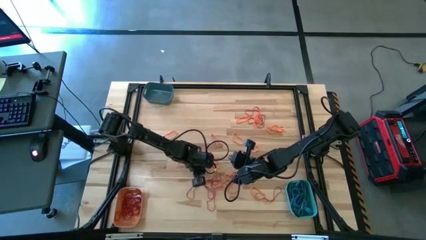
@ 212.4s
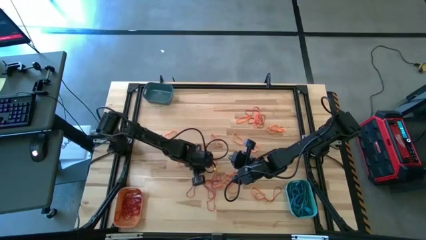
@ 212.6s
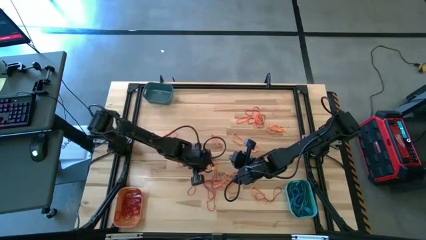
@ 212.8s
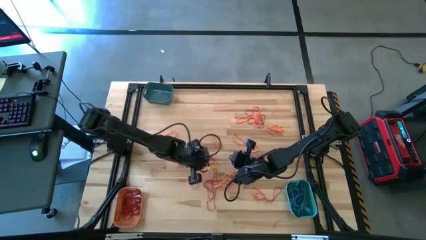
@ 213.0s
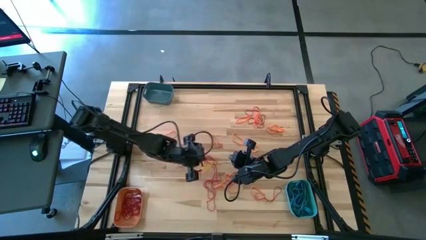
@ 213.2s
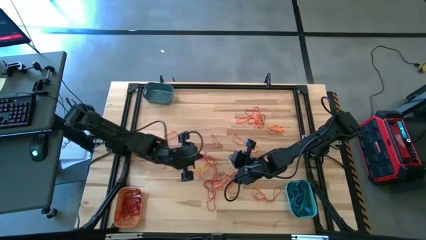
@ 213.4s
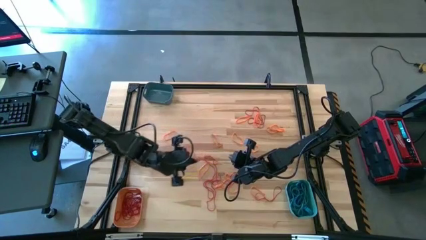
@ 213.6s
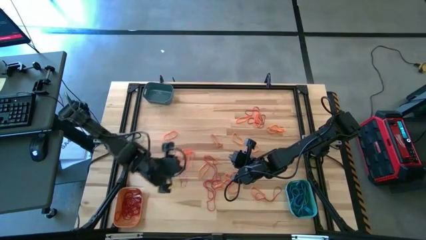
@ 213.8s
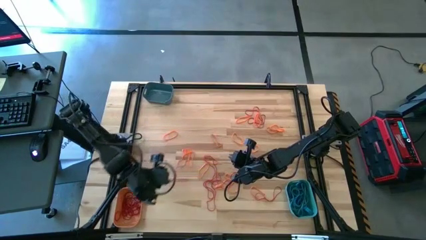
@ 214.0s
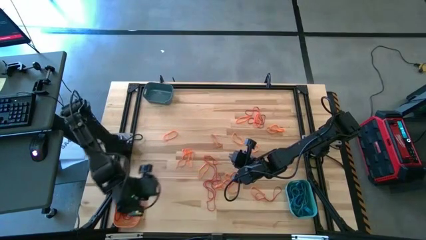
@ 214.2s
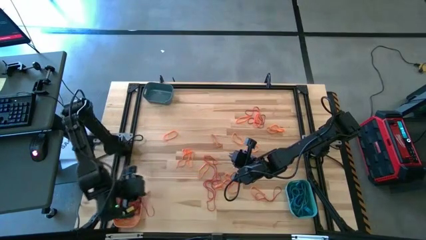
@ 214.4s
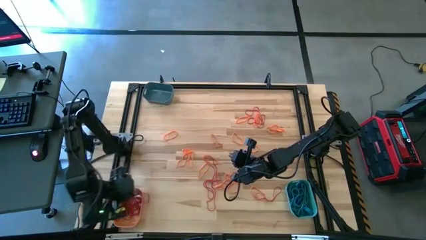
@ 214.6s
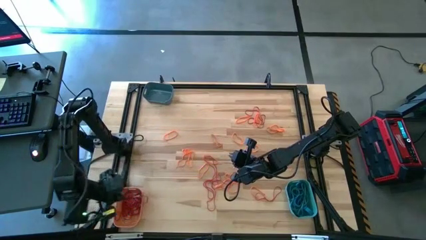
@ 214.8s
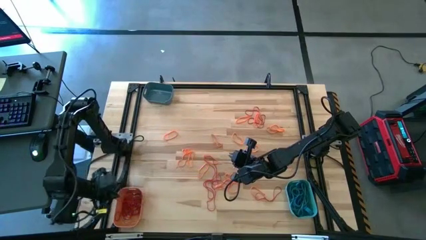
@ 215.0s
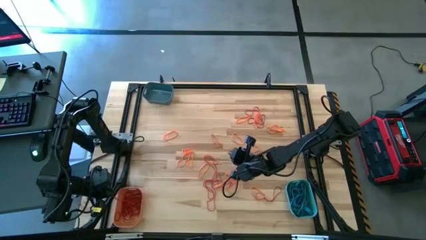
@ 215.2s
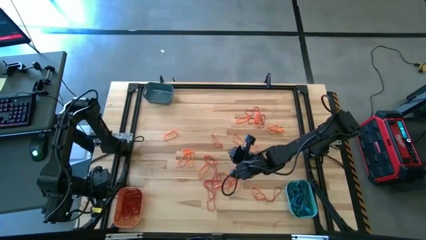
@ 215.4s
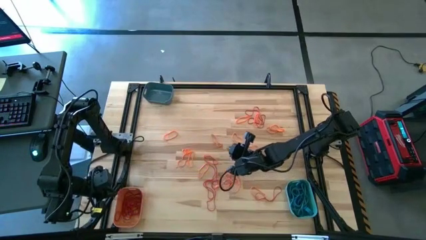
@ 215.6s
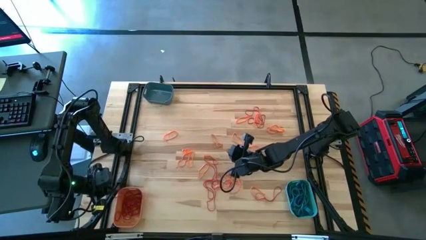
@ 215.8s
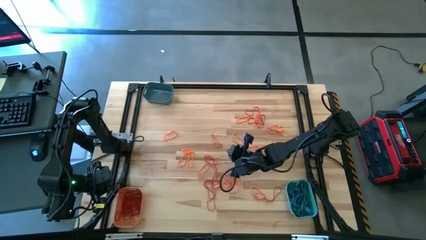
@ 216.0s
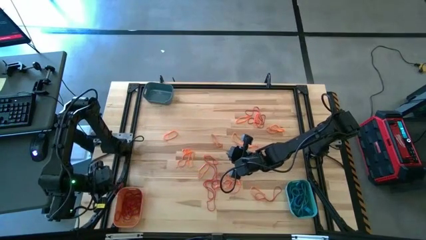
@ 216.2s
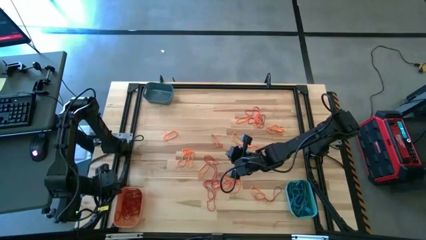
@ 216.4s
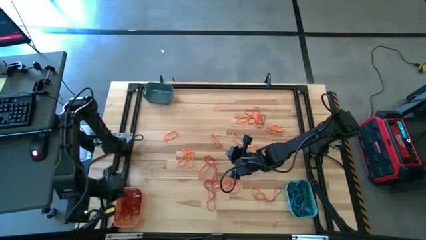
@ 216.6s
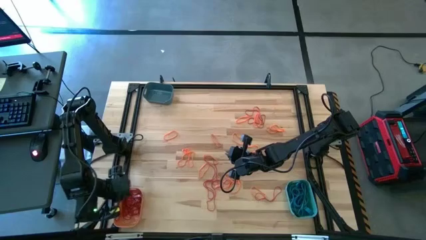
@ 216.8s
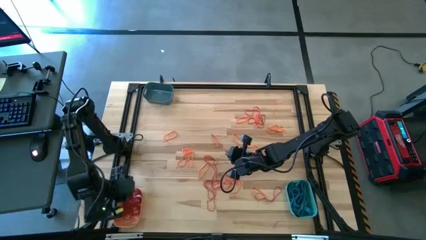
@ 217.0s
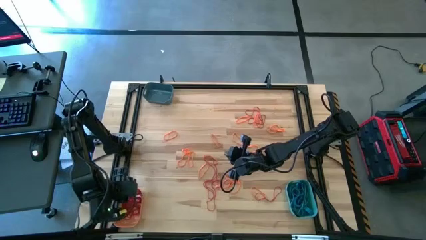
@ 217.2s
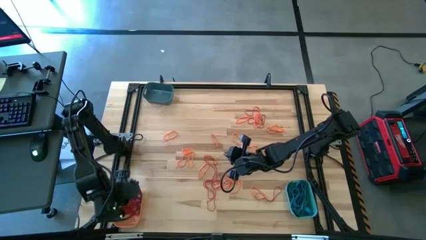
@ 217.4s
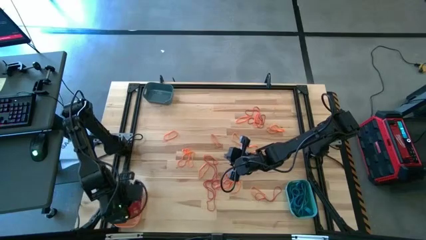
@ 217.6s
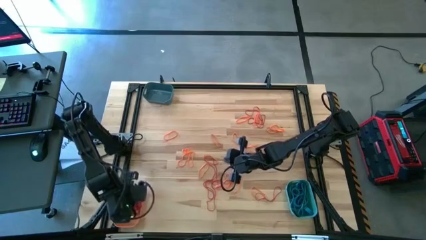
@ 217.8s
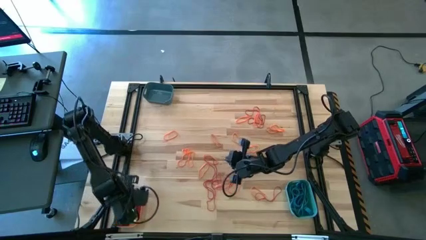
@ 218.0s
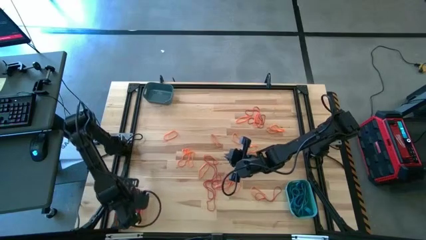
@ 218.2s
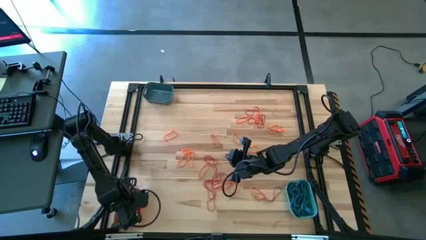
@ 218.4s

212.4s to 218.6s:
Task: Sort rubber bands into baskets
Put the red rubber band into the orange bin

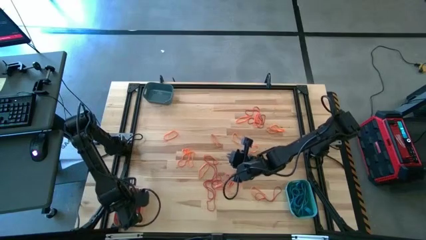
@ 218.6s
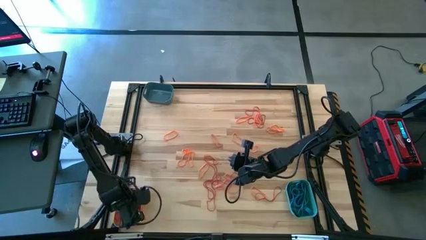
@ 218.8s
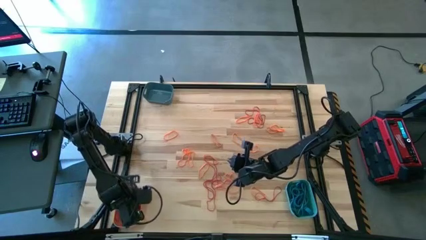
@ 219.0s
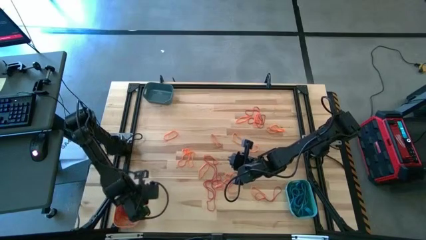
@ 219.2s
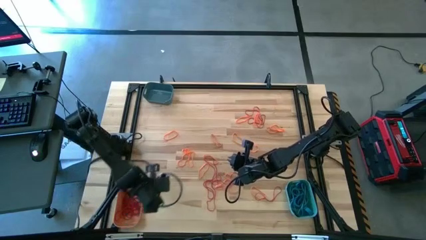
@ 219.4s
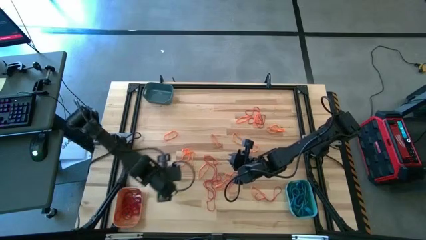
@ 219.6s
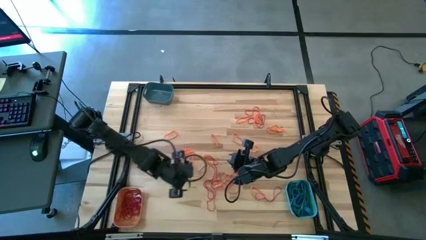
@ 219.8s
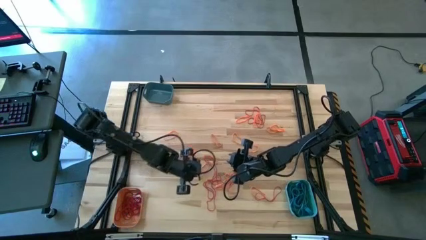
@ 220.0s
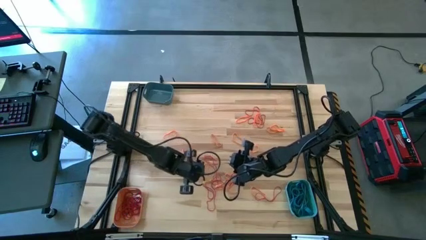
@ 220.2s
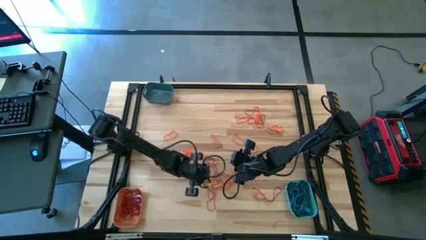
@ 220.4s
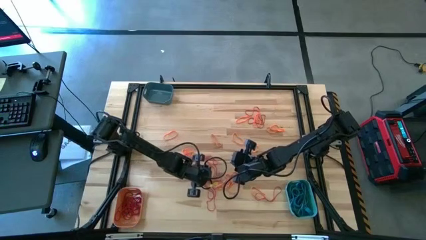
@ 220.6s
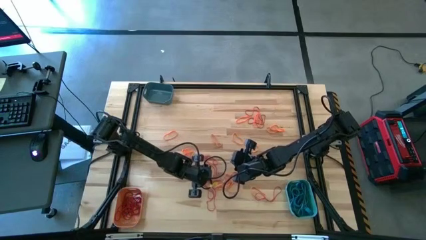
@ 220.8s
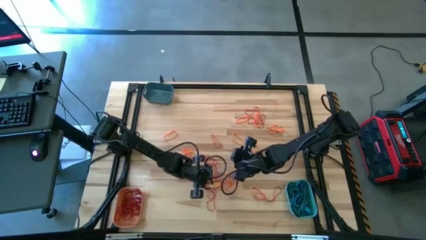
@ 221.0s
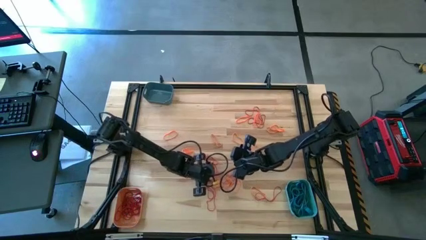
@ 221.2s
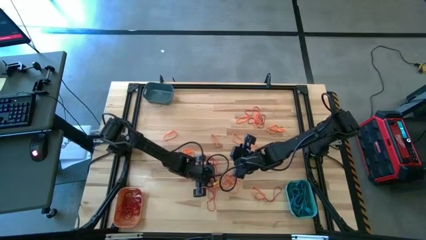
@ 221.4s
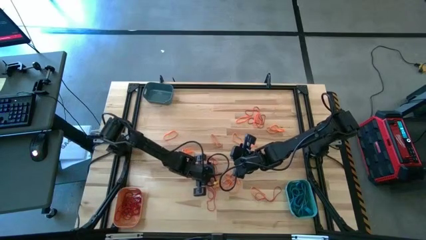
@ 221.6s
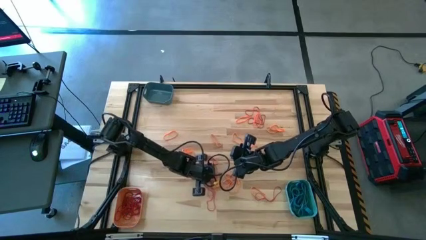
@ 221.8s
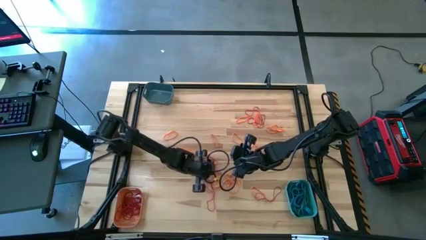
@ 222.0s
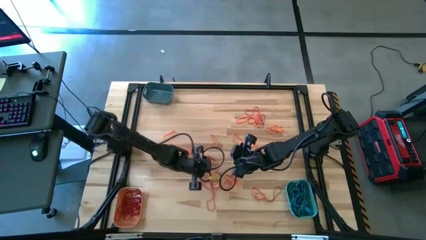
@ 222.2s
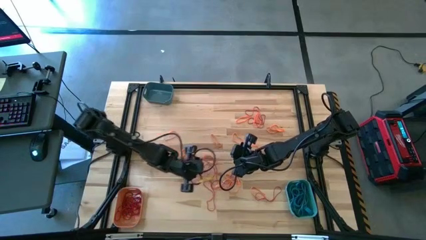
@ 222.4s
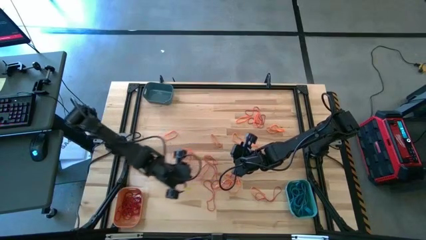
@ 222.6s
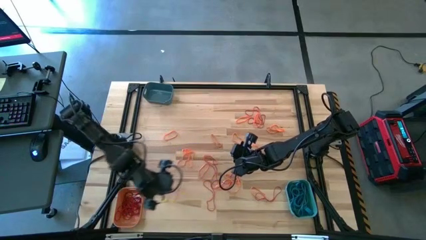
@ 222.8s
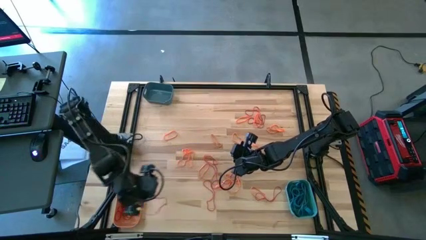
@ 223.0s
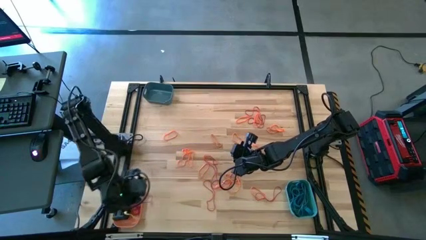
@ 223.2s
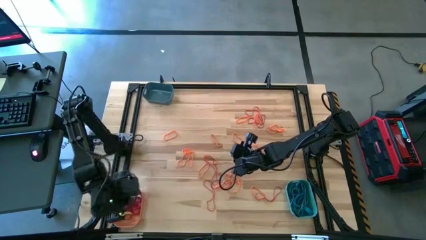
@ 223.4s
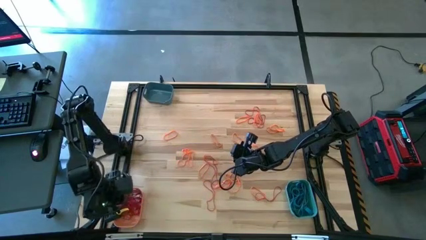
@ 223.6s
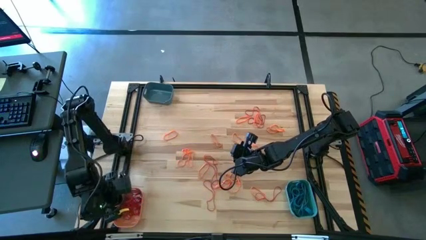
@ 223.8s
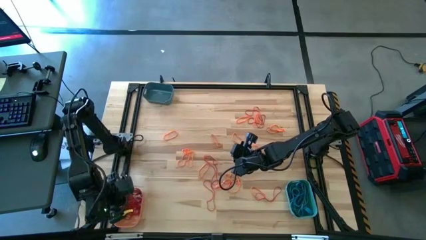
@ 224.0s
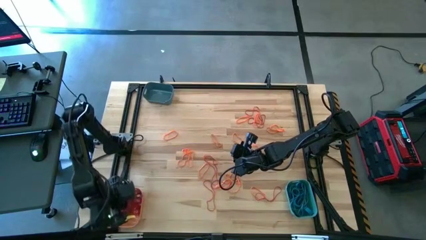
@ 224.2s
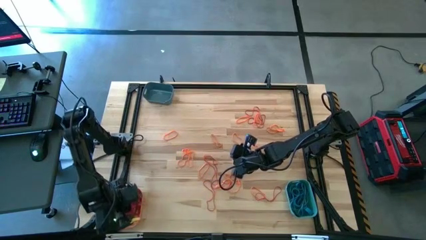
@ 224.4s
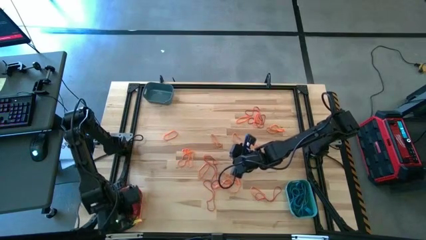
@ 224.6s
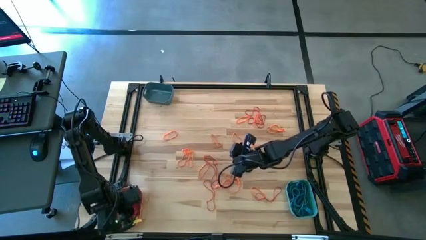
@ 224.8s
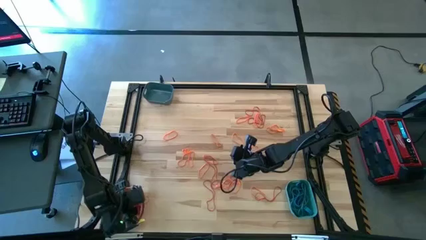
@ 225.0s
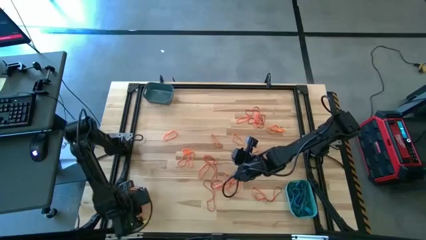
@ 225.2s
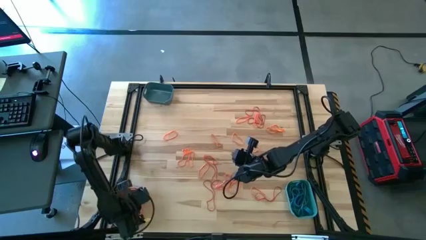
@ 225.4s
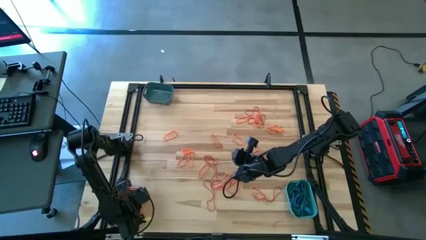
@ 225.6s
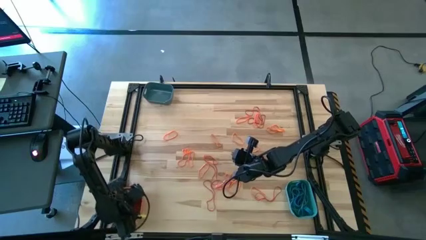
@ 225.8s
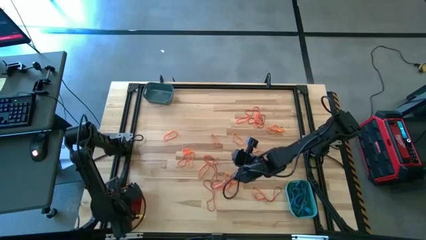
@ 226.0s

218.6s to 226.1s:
Put the red rubber band into the orange bin
